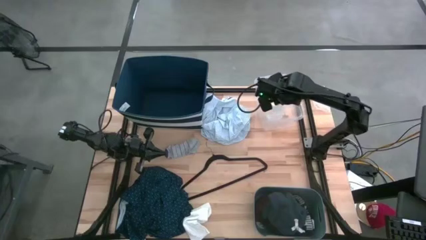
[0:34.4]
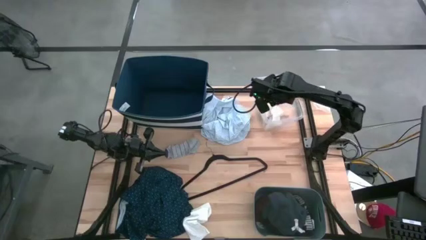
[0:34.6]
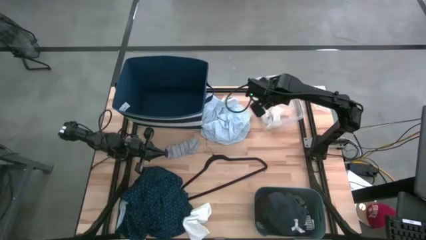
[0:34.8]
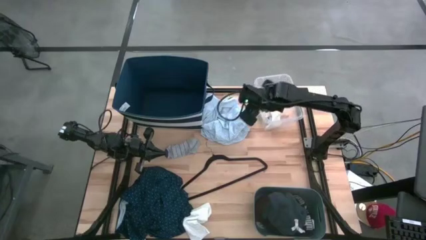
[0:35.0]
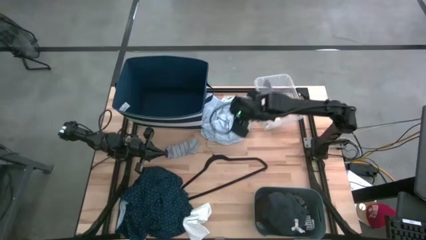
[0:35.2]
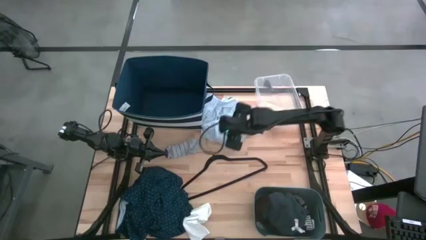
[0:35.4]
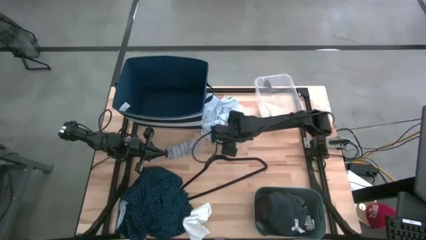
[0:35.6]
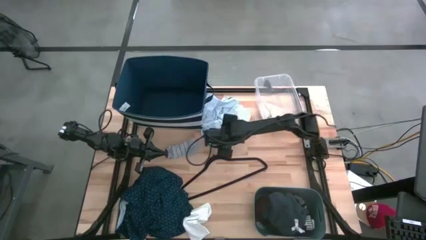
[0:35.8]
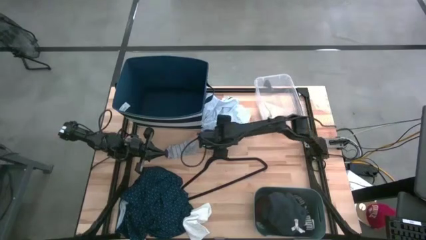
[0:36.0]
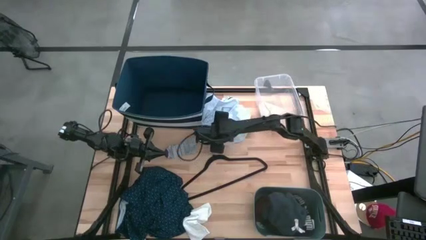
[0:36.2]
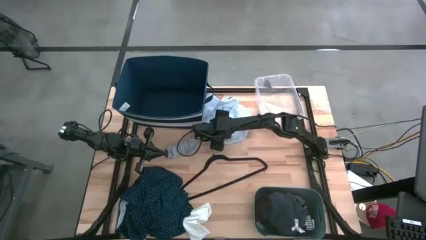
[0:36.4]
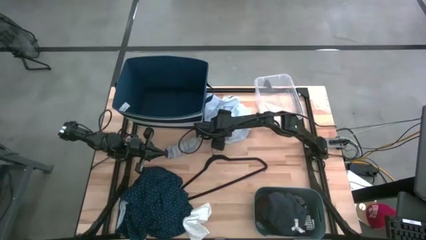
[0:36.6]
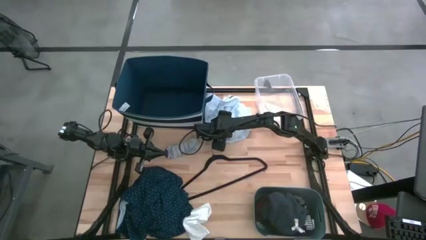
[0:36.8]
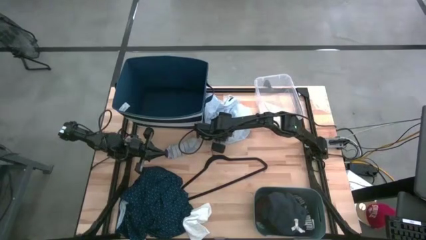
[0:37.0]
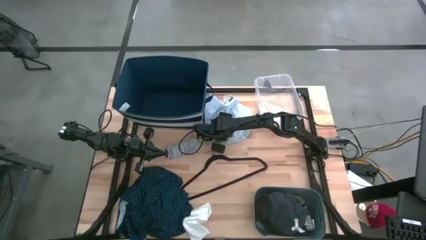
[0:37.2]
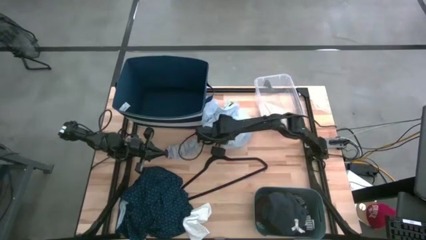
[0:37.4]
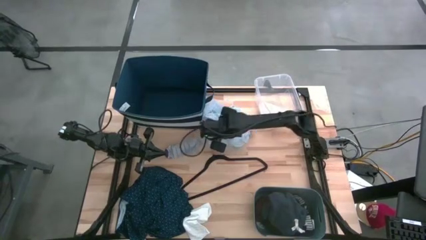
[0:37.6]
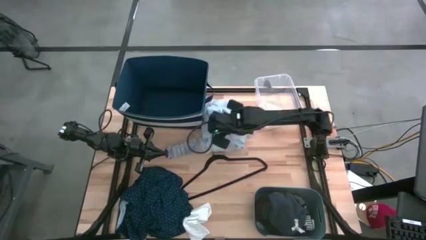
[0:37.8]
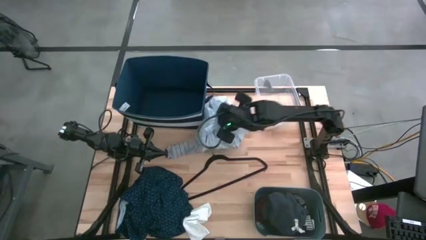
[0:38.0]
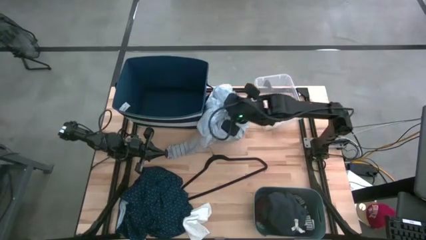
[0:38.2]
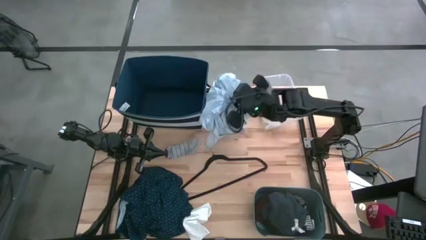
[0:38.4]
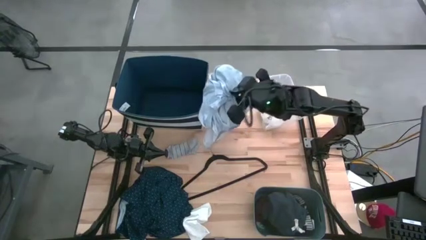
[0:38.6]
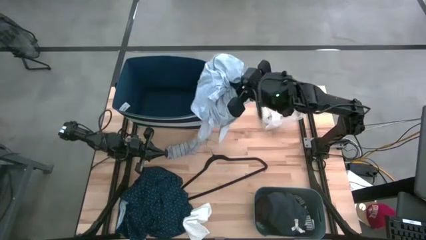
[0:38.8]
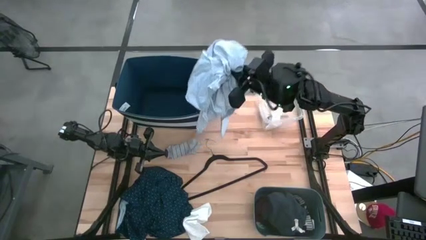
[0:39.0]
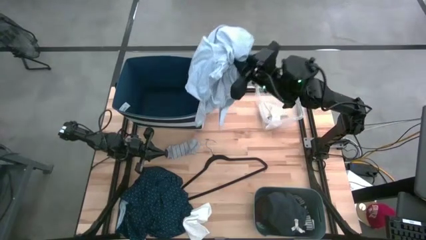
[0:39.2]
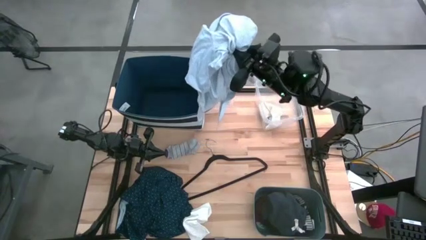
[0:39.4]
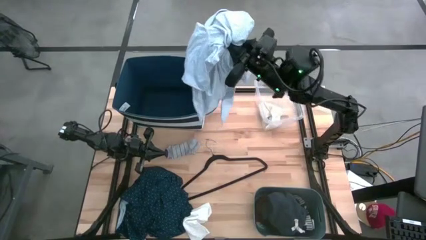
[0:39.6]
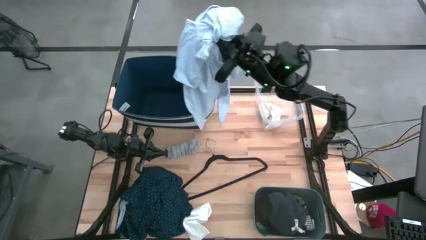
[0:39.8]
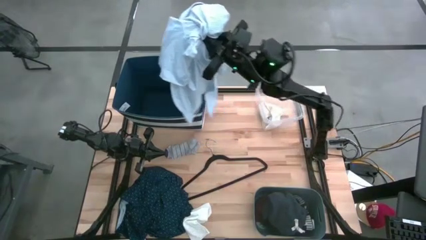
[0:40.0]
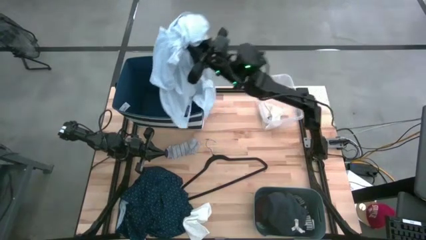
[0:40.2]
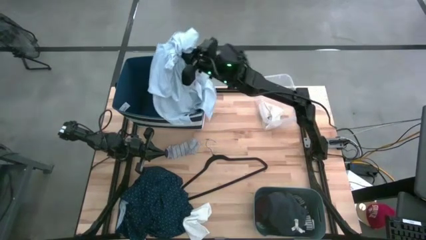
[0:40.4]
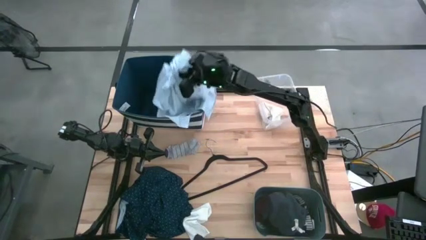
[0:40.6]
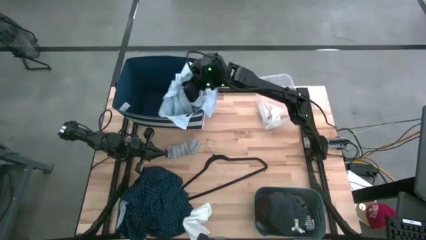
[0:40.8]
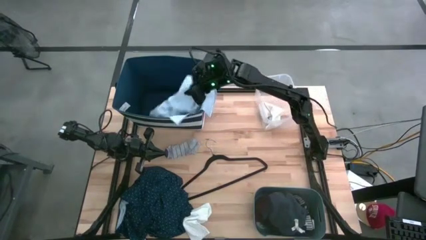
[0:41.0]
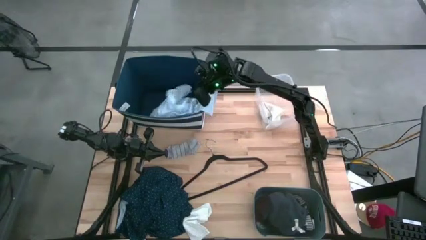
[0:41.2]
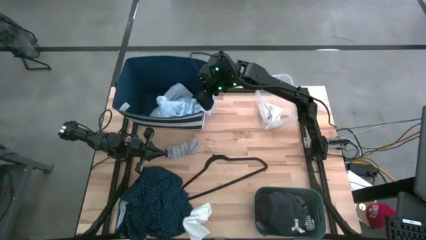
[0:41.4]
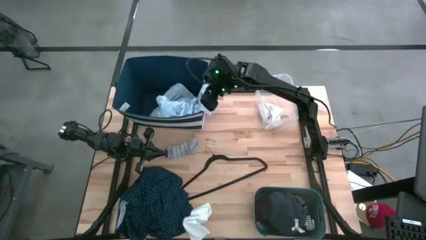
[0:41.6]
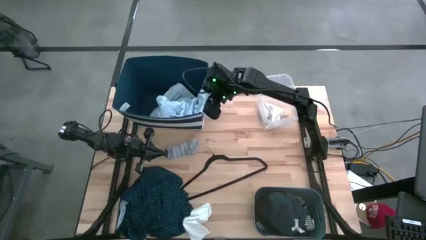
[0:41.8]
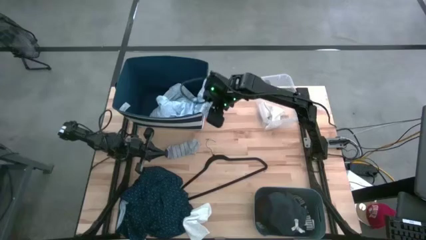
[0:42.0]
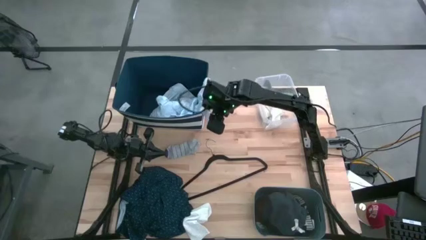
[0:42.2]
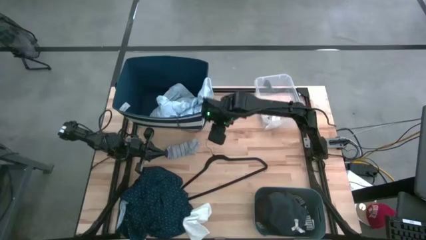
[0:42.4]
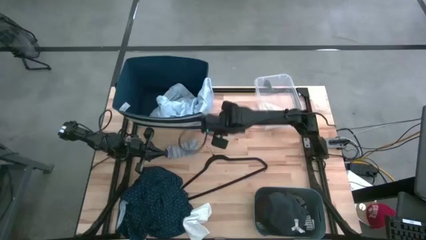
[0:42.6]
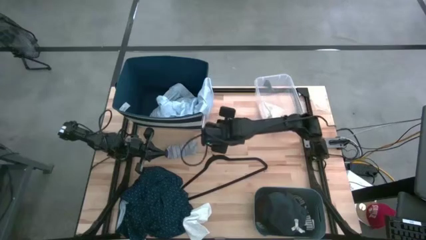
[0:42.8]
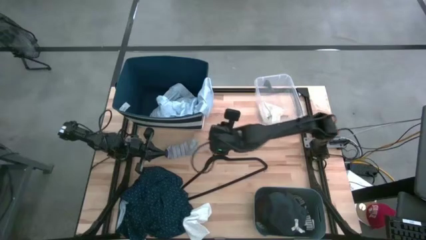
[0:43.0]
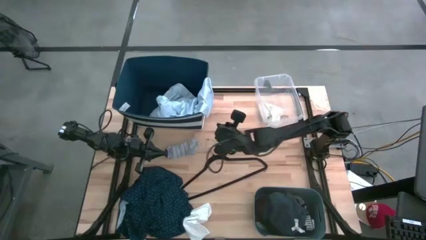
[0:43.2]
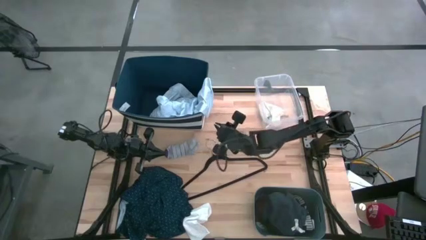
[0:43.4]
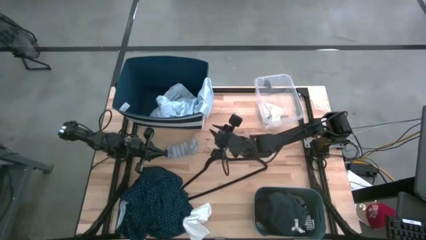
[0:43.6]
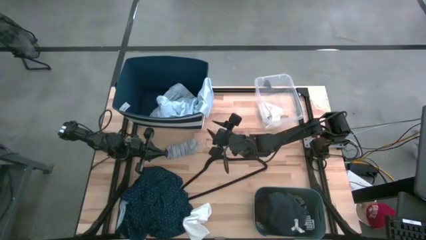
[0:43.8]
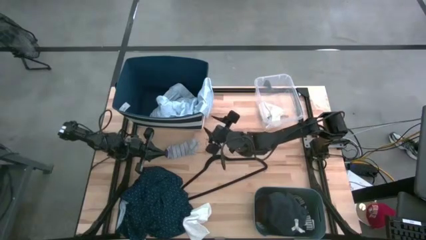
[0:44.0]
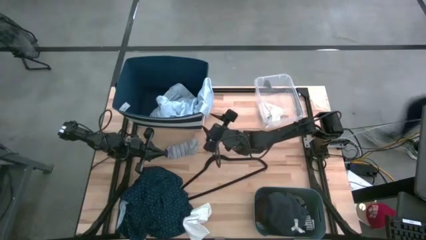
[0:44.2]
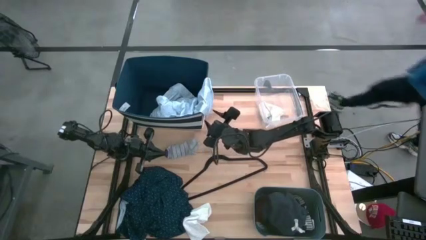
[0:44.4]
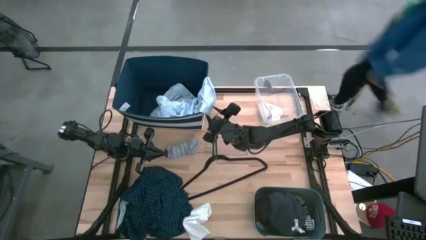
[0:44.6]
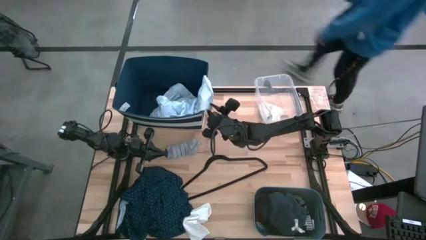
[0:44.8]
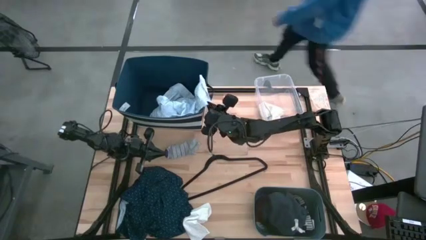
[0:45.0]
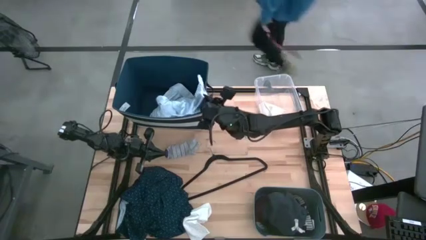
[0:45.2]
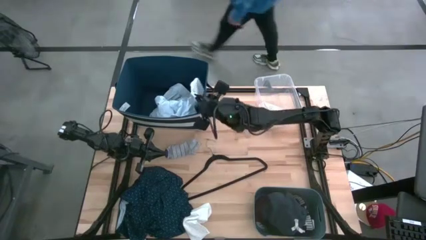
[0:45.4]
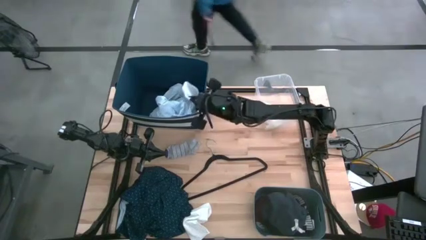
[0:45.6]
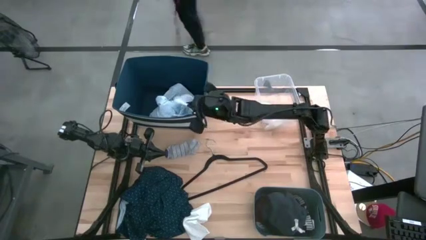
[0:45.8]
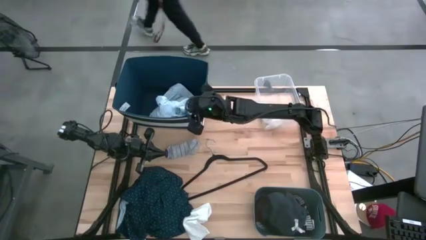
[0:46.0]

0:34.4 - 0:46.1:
Task: Pick & Place Cloths
Put the white patterned polo shirt into the laundry bin

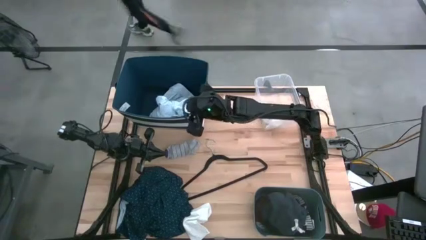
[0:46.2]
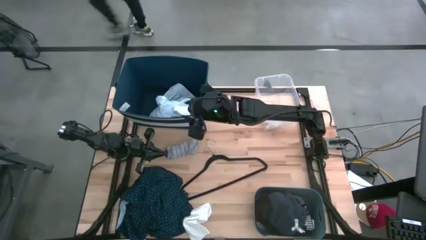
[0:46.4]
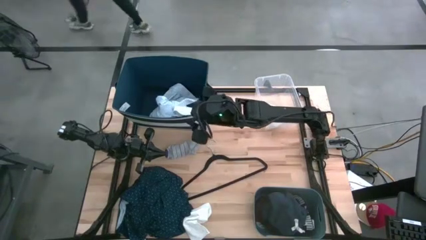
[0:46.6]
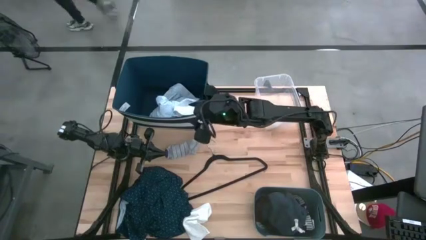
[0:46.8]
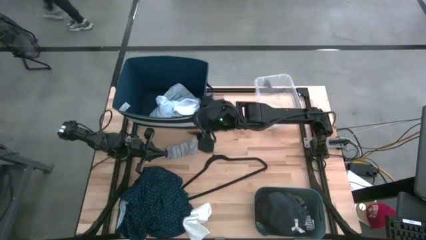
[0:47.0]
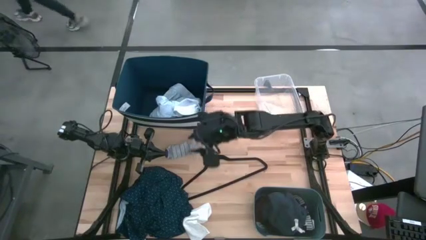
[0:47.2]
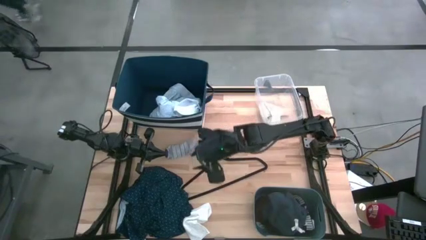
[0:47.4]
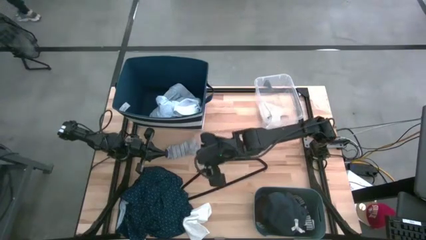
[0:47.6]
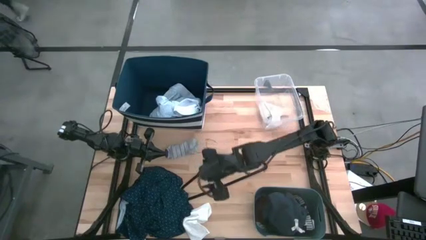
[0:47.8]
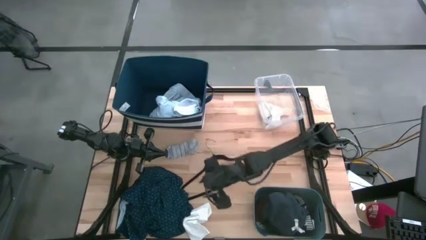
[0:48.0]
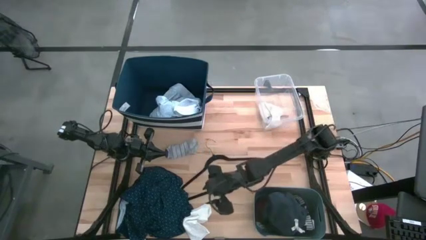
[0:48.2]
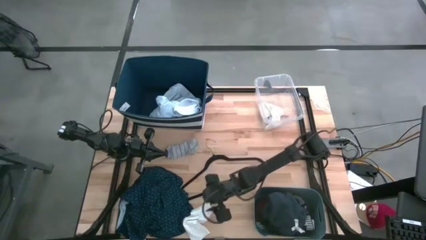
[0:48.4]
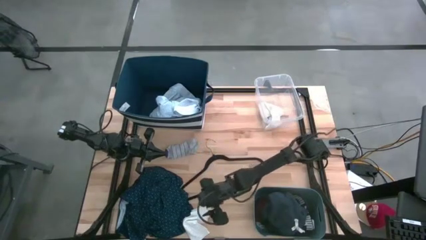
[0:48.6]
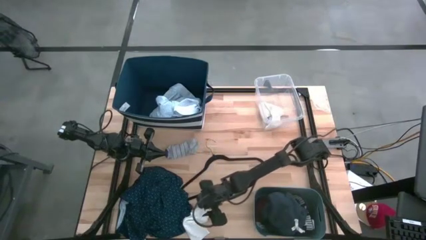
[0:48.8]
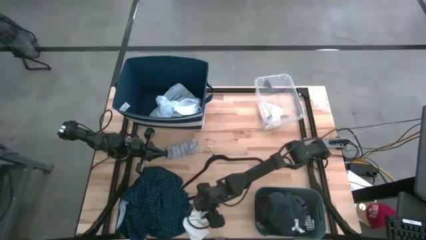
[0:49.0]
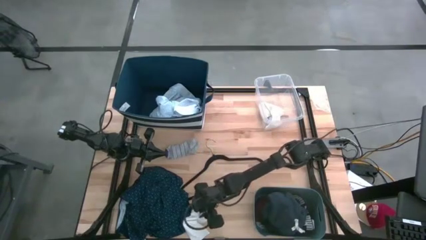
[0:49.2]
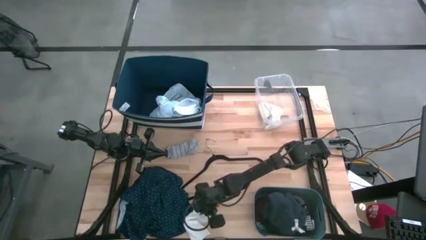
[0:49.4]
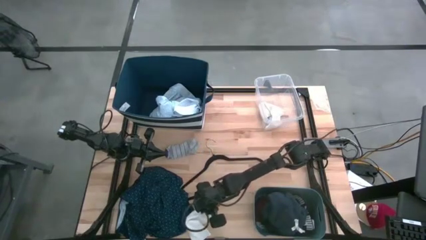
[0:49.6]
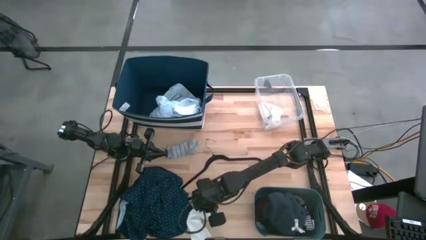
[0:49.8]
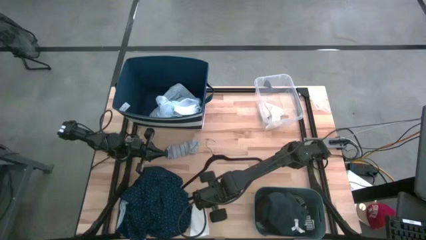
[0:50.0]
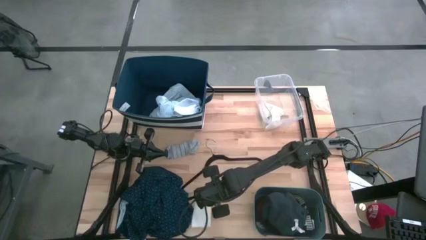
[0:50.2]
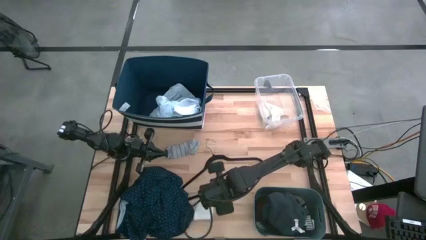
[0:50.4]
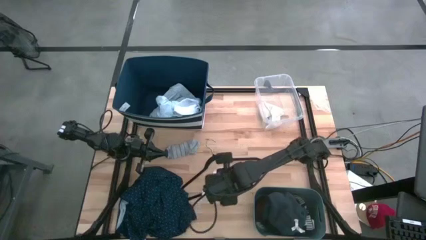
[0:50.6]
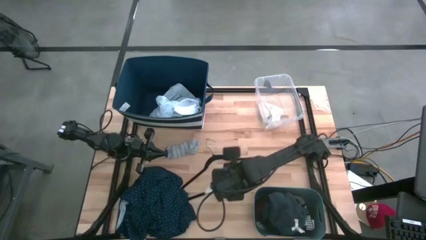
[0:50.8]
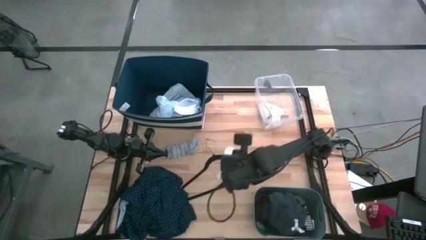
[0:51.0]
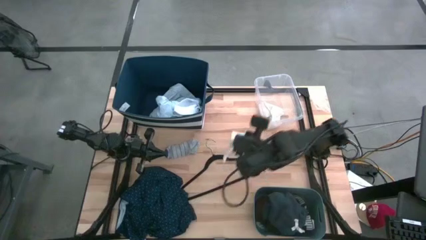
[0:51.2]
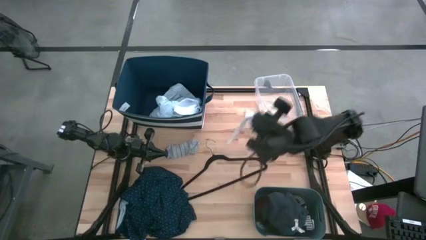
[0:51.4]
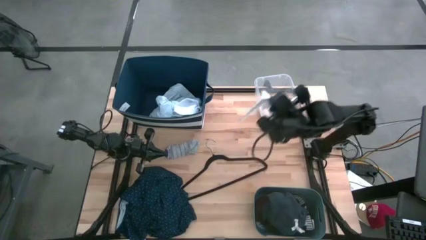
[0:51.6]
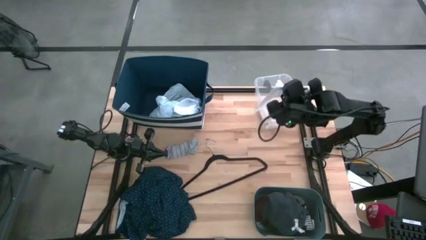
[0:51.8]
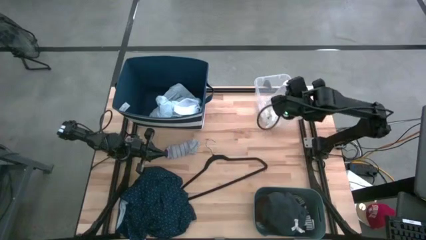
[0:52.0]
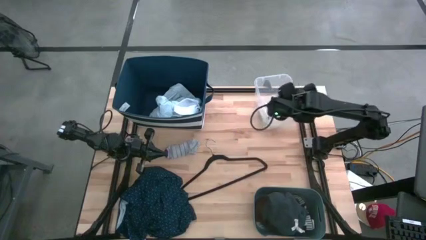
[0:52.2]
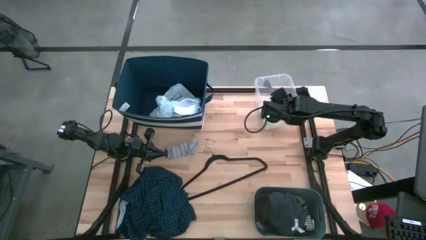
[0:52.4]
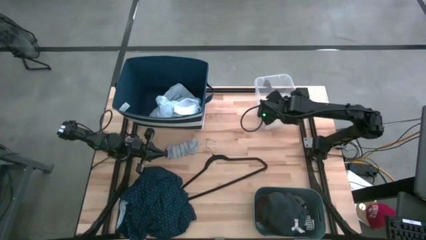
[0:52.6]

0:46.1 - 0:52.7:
Put the white sock into the transparent bin
